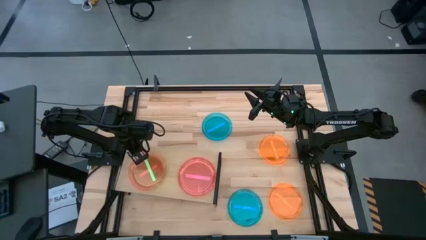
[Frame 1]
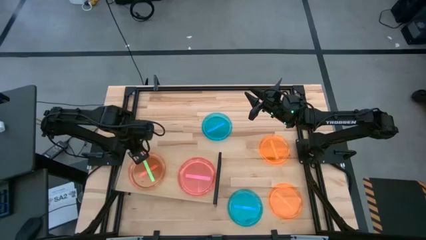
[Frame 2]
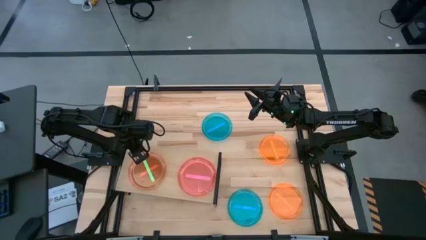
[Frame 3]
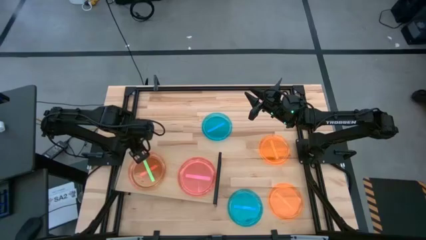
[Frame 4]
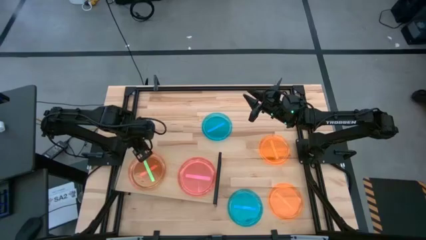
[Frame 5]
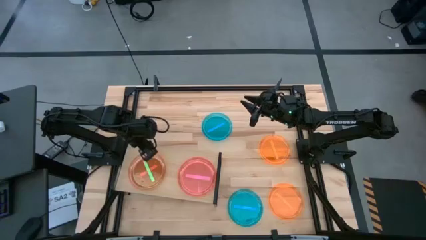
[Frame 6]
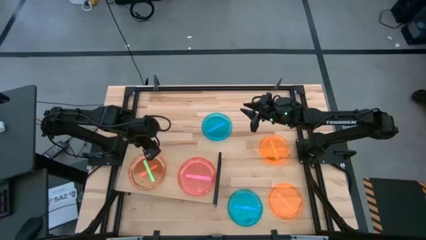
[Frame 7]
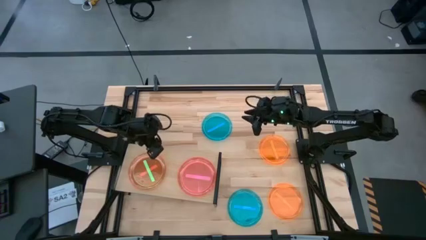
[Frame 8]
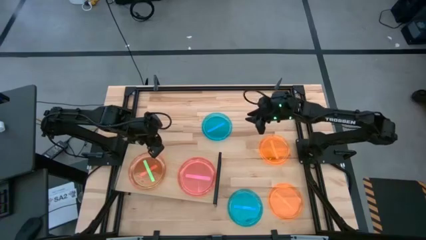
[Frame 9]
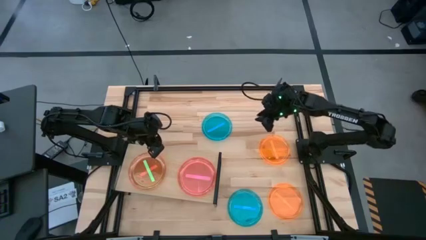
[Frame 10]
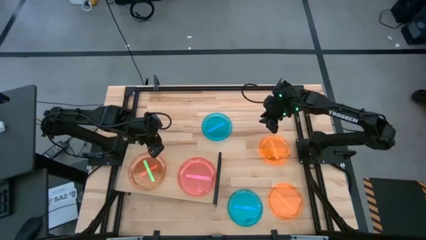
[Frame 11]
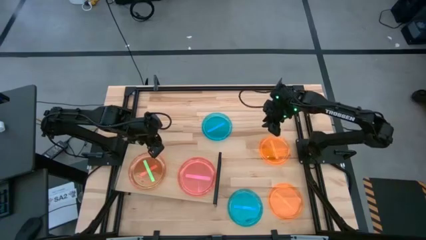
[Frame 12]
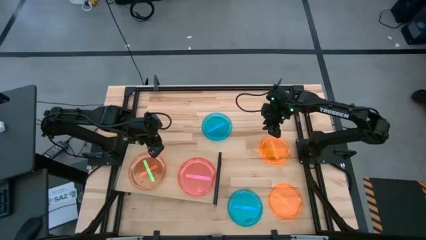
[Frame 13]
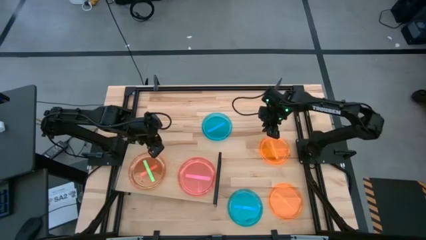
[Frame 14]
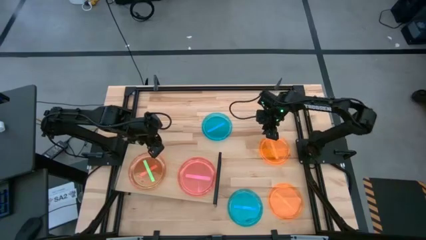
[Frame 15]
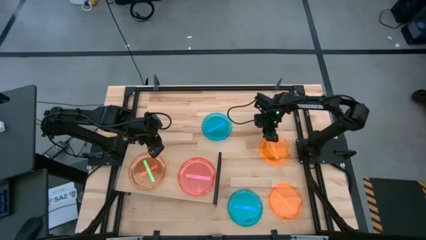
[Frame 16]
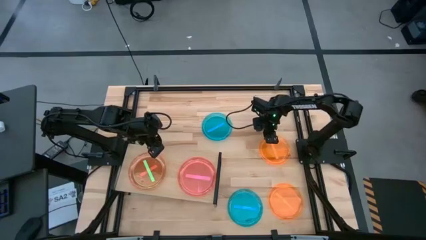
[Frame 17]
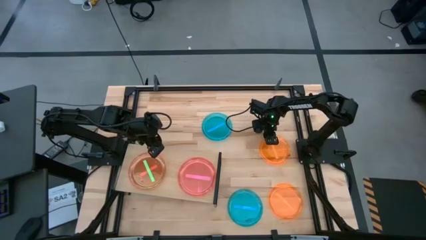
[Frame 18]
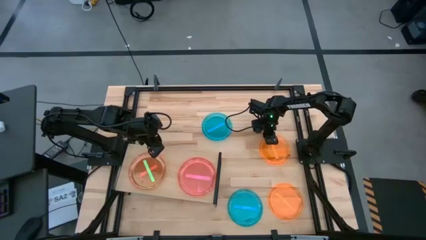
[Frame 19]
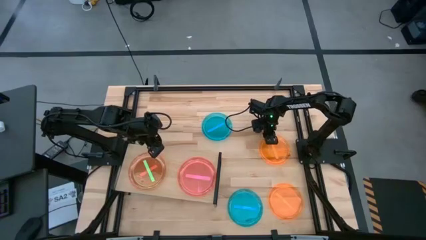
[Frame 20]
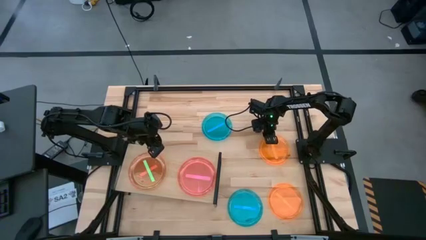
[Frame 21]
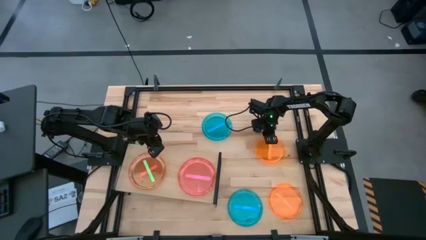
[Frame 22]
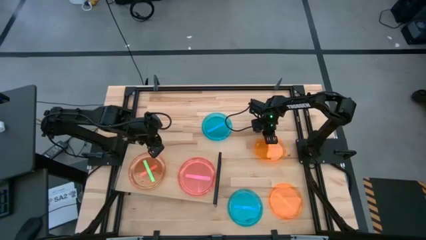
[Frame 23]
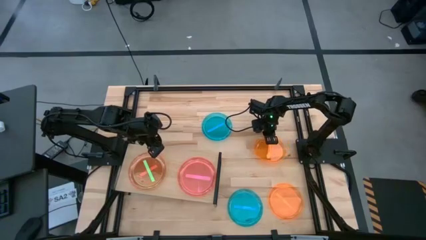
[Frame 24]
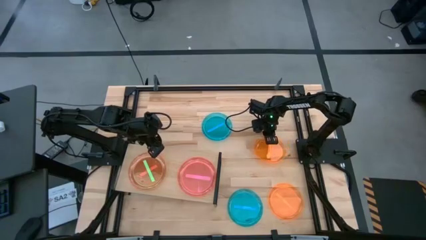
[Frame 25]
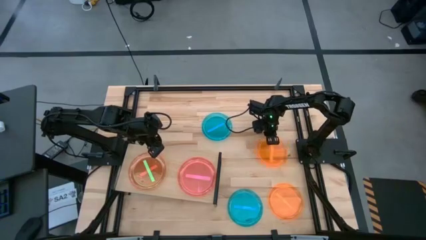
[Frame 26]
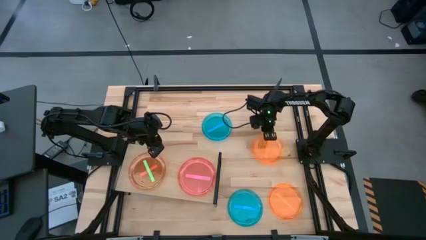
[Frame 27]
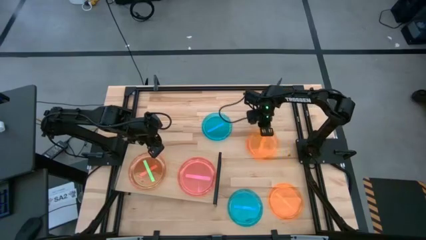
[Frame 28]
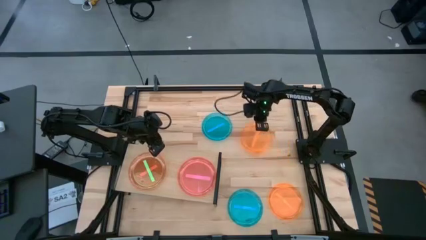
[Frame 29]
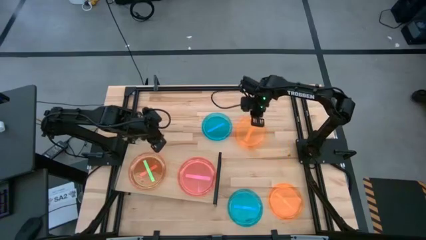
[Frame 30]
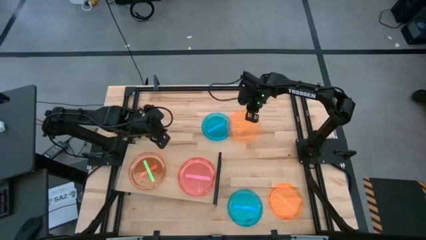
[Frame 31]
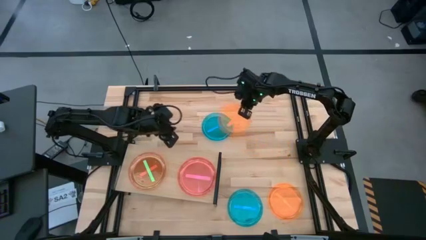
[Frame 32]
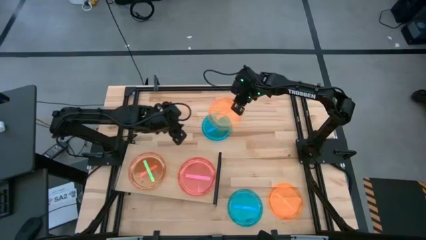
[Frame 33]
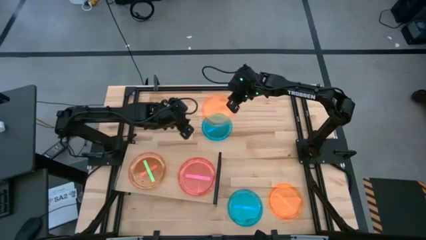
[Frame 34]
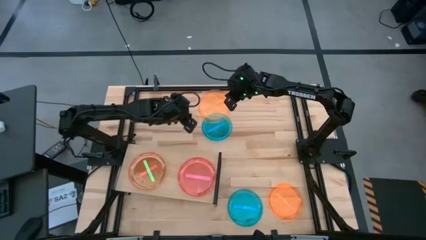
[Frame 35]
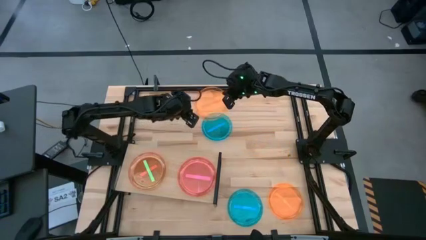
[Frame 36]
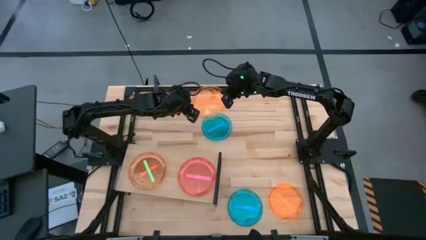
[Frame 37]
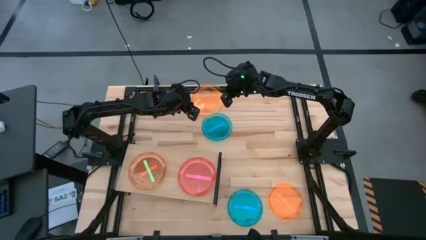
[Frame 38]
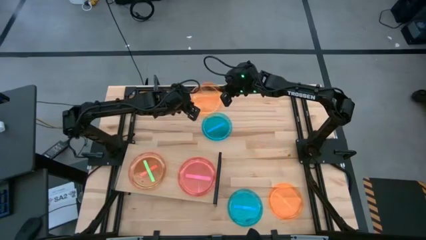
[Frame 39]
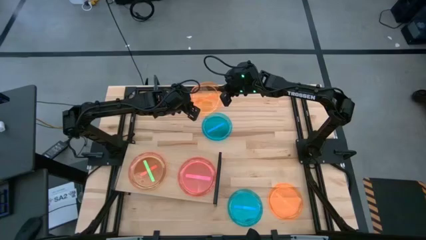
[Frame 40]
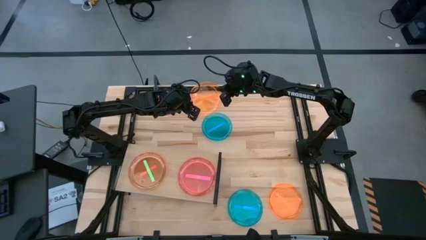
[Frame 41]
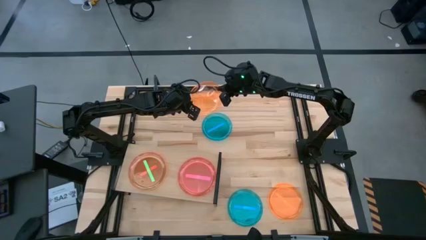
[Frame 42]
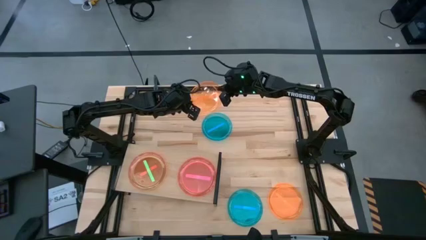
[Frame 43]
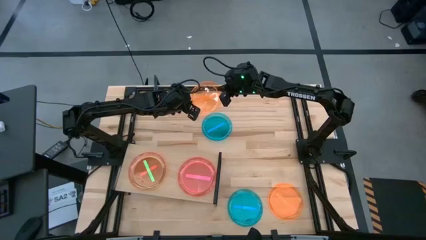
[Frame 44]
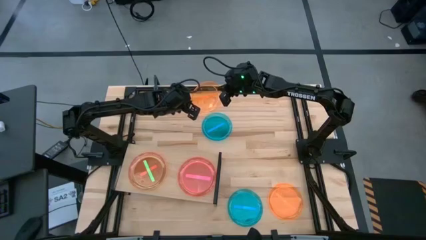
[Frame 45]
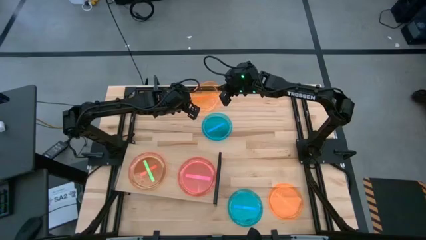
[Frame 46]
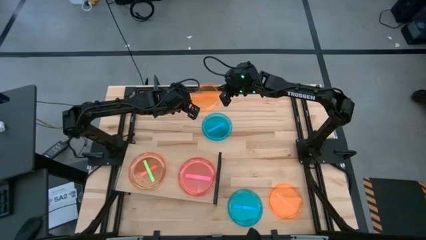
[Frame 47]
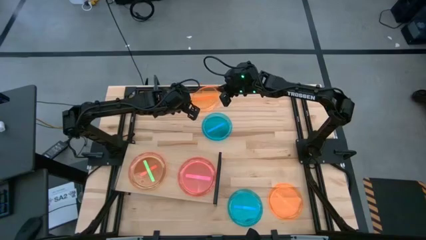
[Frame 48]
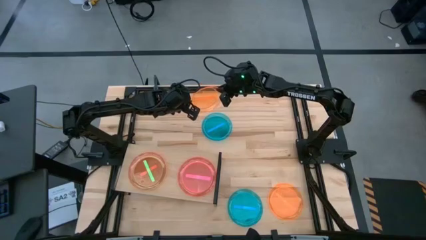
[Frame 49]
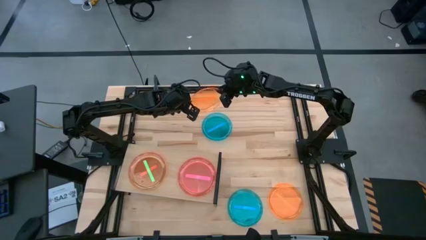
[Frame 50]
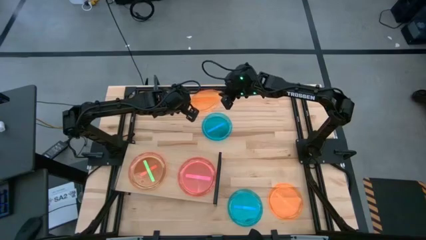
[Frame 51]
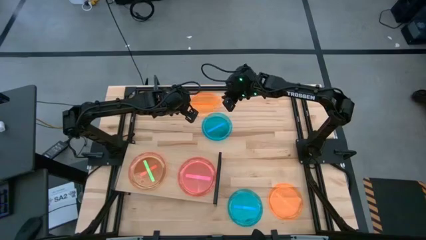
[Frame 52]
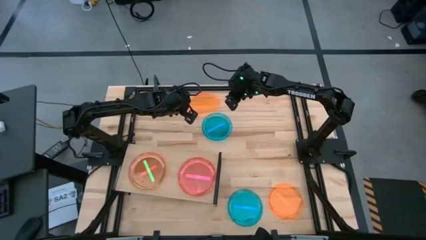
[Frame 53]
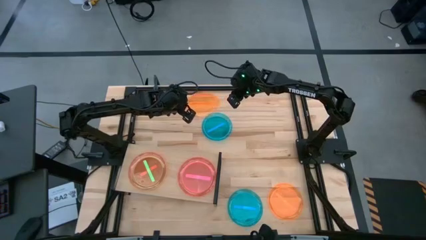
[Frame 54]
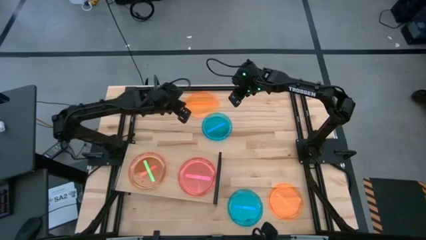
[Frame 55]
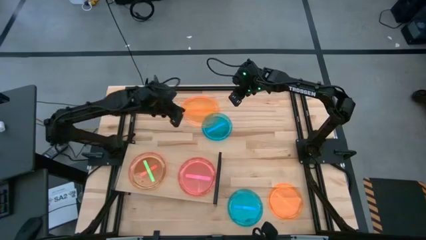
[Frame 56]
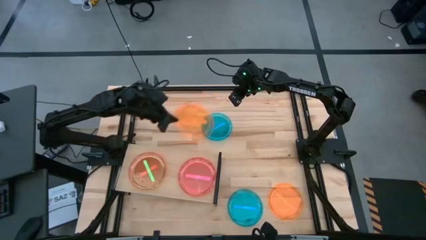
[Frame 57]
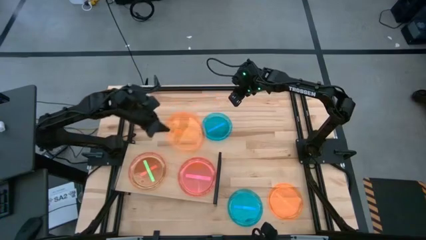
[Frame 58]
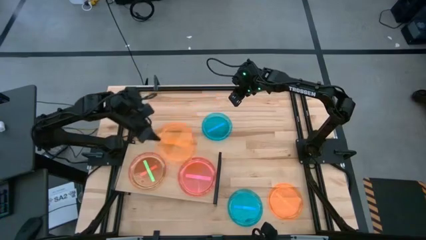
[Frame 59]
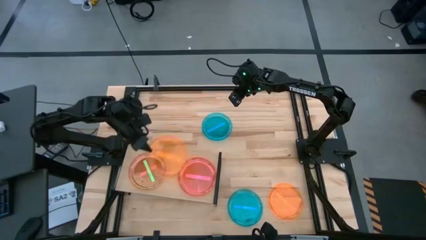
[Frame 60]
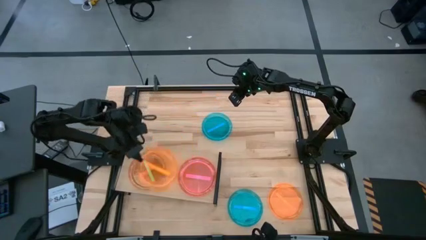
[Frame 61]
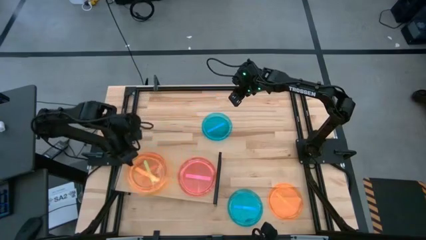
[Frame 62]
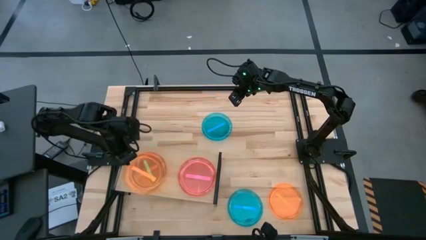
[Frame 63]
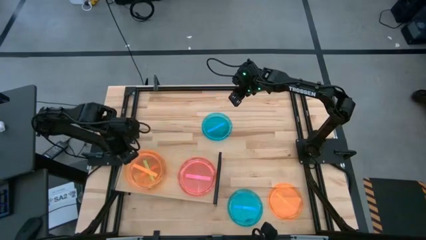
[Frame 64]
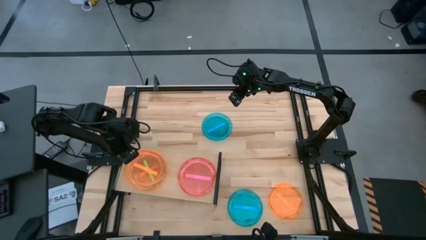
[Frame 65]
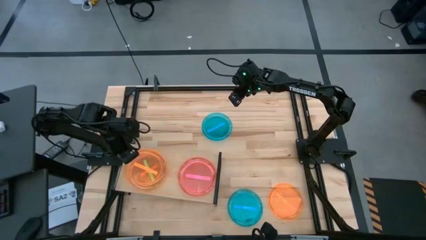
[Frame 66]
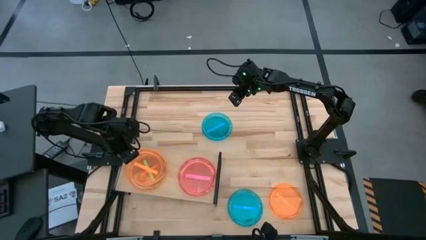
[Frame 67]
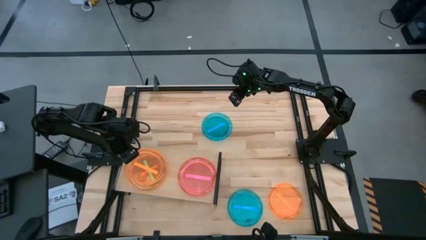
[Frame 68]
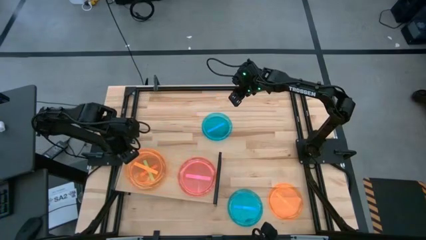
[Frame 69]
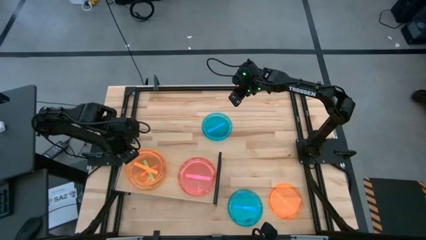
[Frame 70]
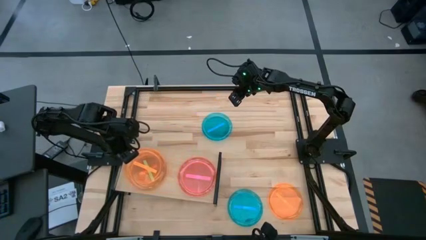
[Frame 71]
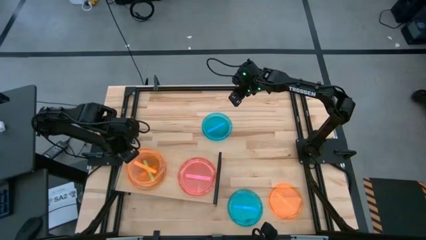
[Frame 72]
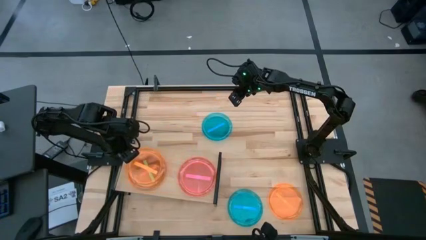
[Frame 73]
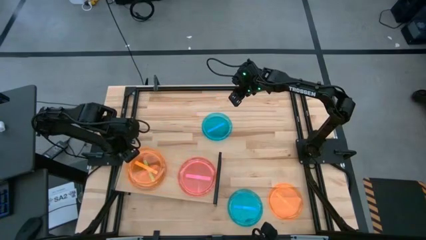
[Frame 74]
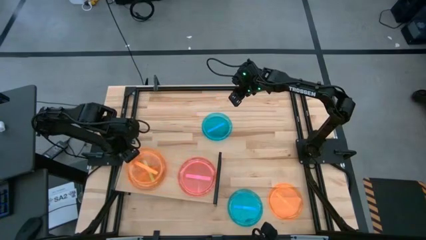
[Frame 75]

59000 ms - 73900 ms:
Task: Place and stack plates onto a shelf
Stack the top orange plate on top of the green plate on the shelf

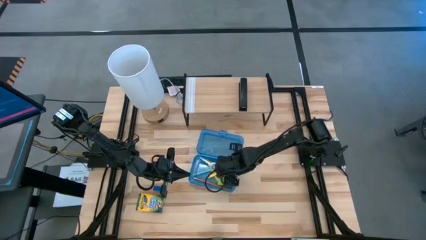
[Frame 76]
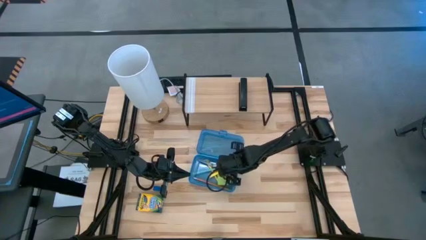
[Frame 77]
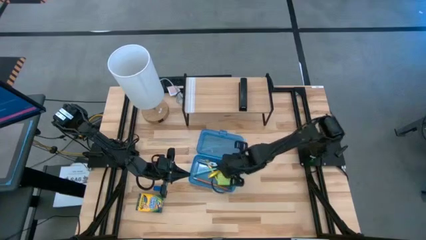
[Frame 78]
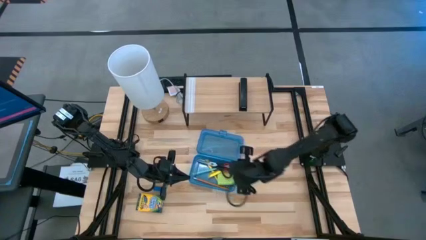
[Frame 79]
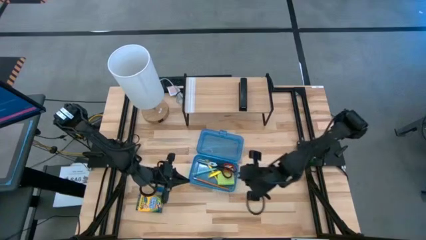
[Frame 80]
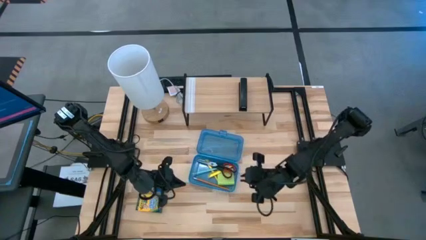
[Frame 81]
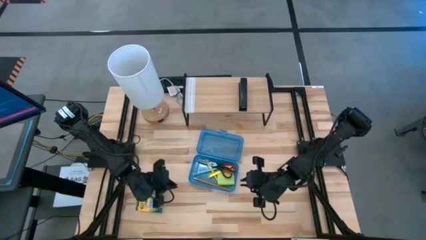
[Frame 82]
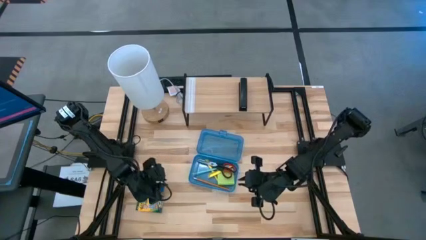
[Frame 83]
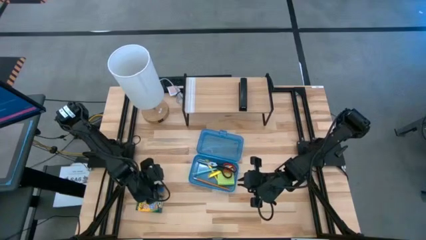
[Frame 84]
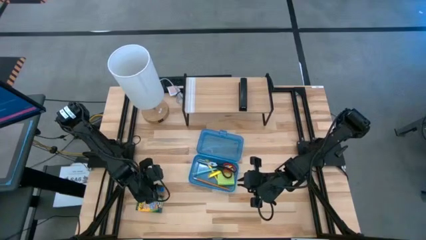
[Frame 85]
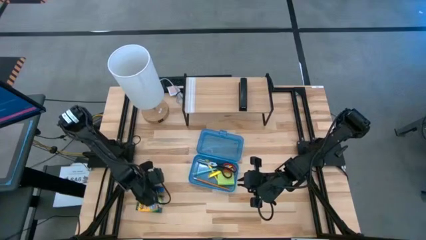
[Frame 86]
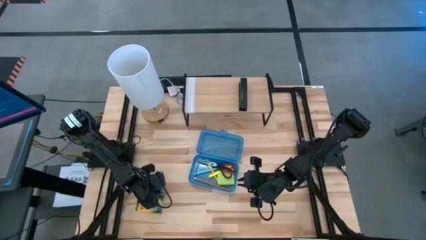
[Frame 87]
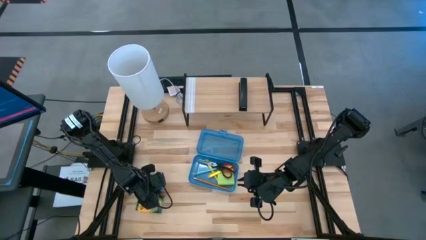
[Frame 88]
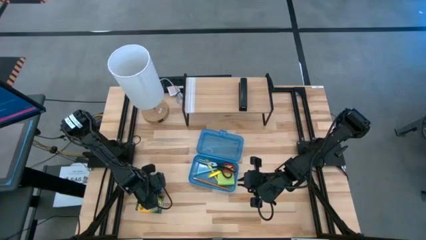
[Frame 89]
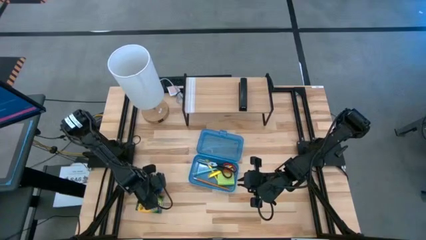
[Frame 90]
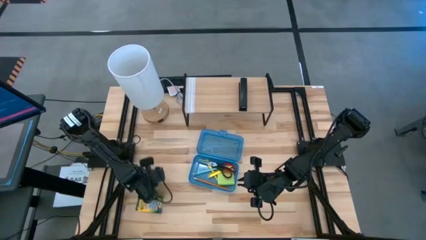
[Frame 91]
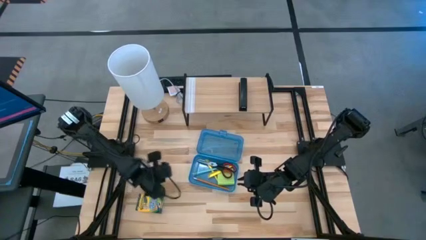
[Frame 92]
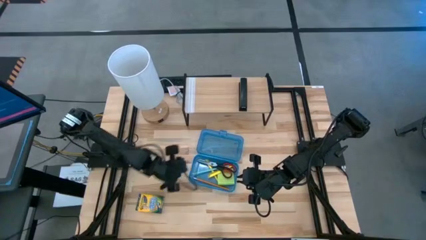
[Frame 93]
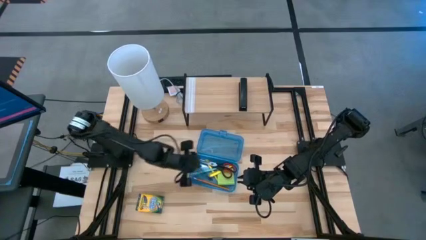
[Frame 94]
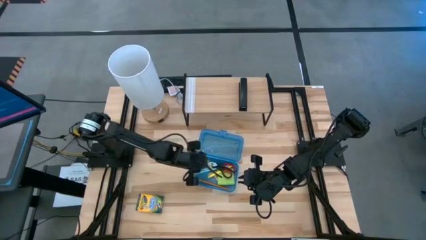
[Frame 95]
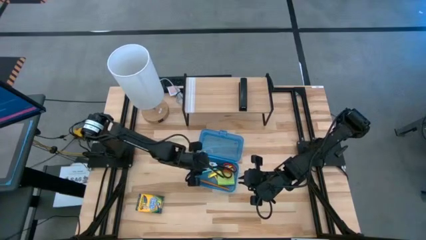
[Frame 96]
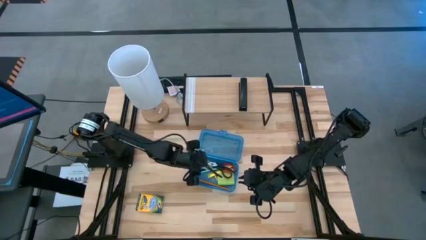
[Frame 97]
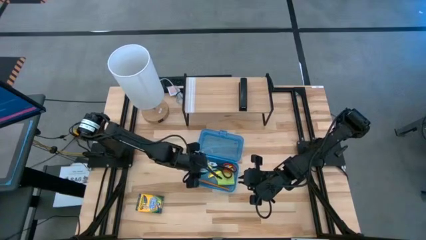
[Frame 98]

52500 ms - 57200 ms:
Task: Pack school essentials
Put the blue eraser into the blue supply box
